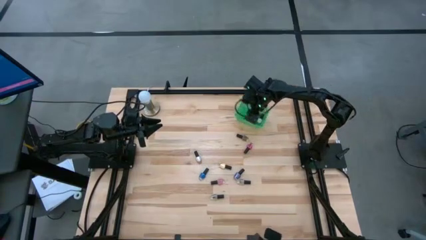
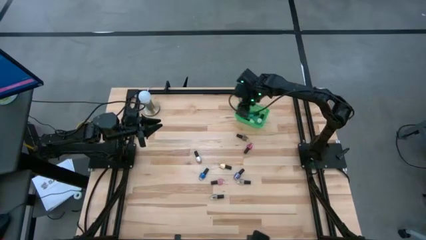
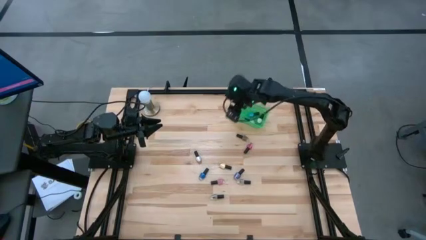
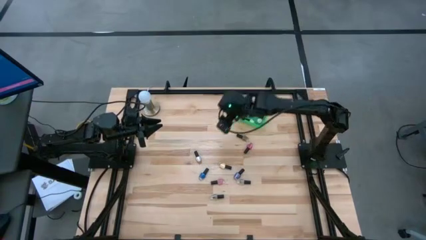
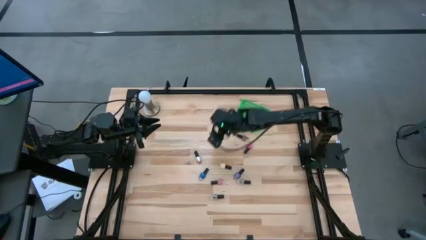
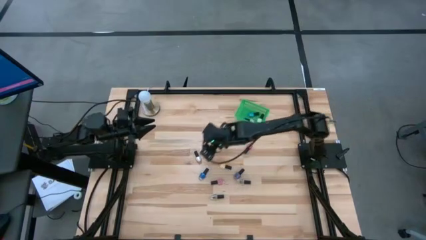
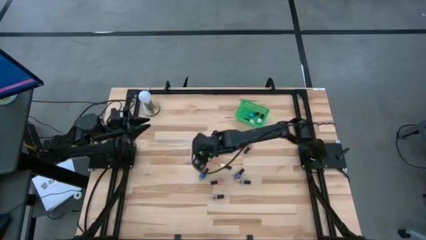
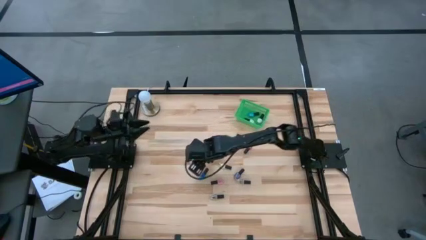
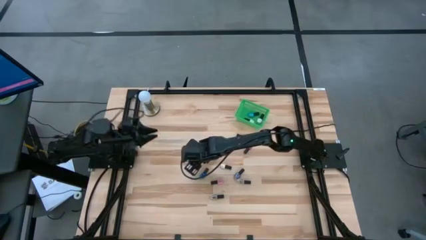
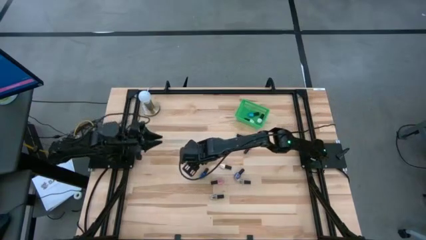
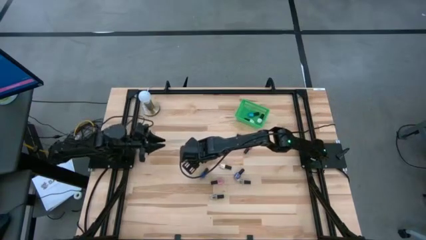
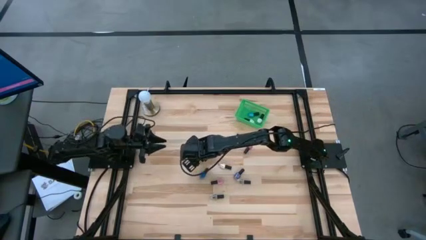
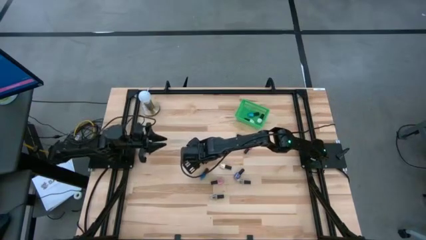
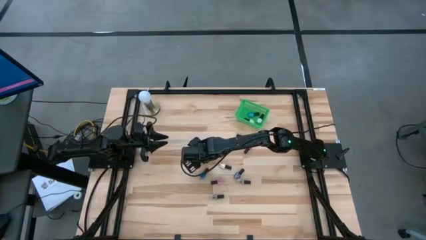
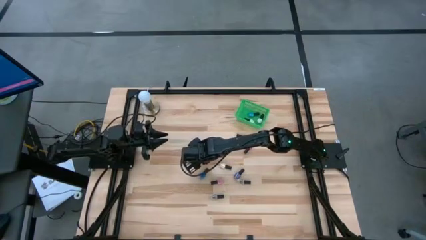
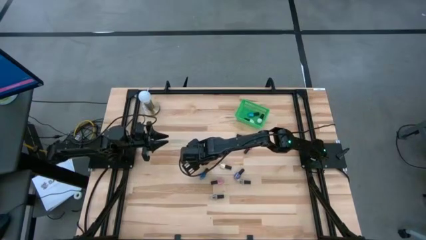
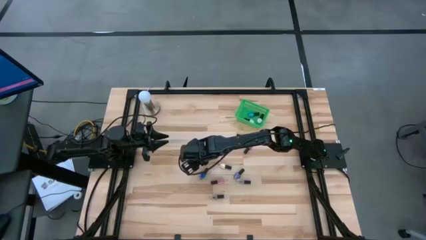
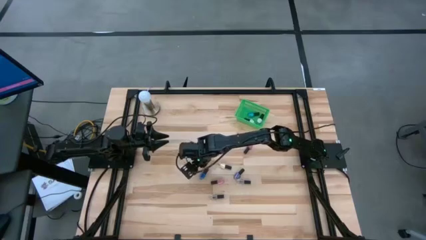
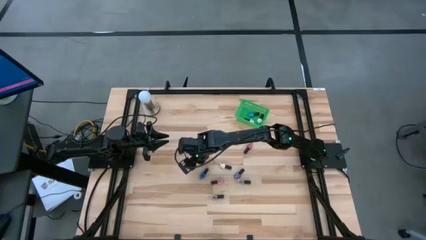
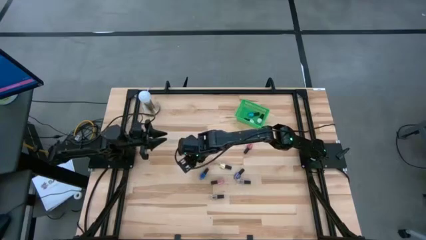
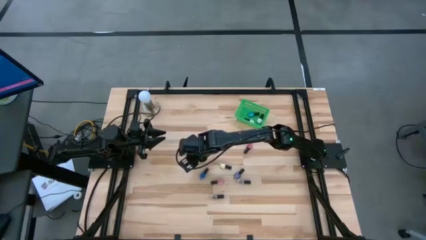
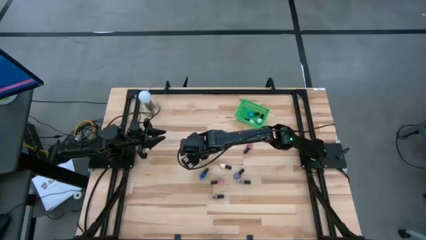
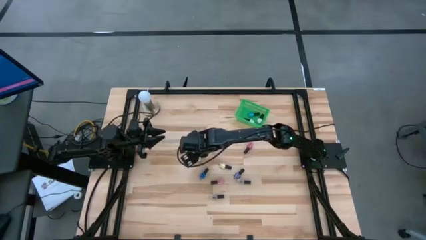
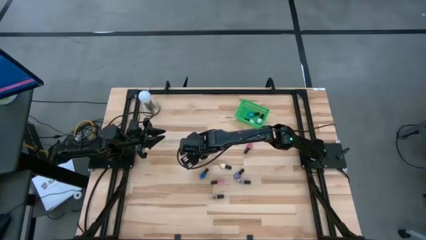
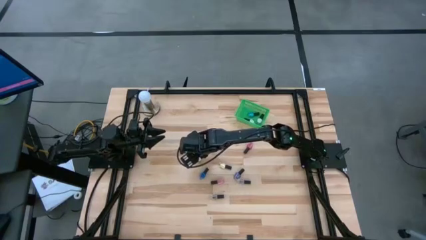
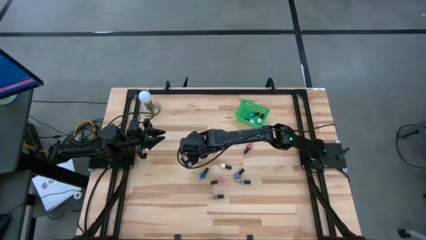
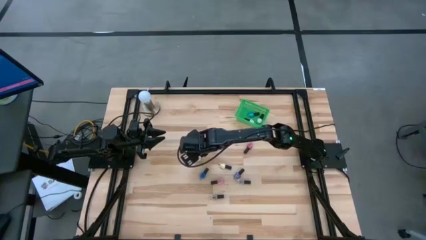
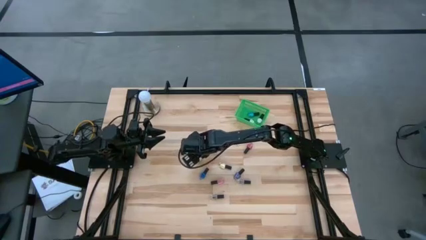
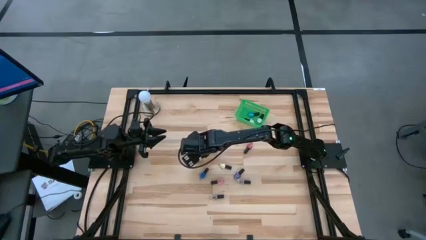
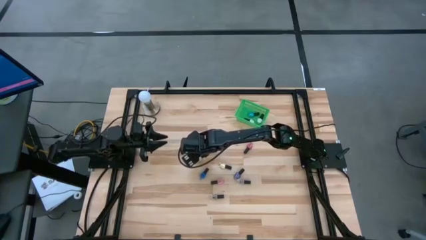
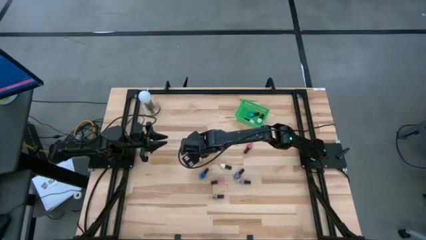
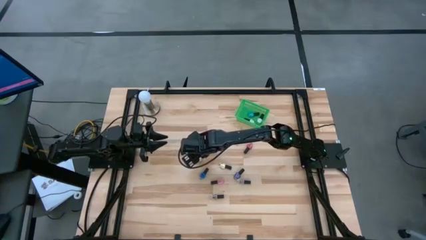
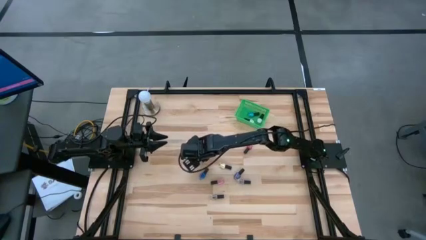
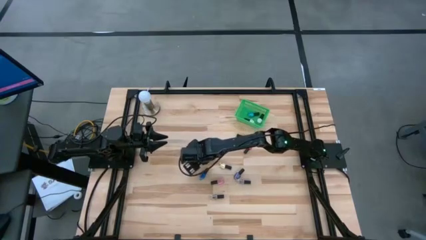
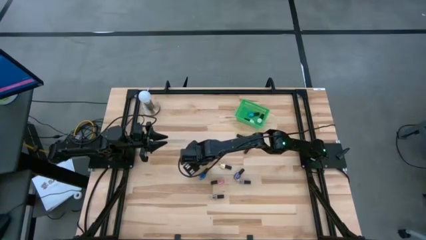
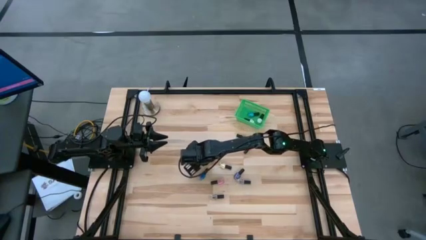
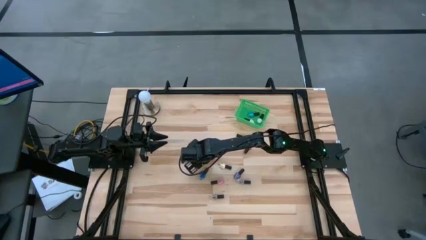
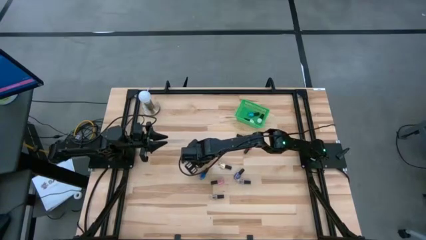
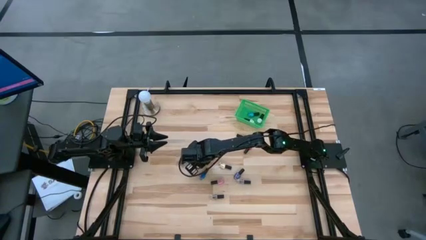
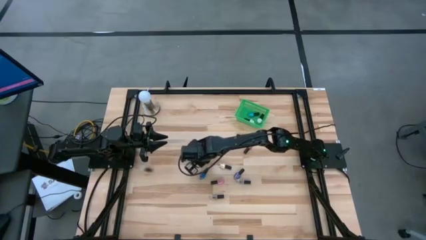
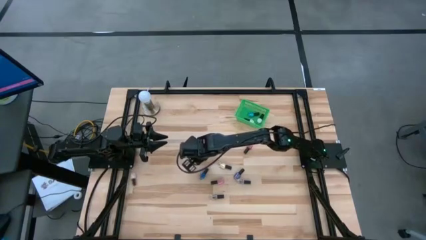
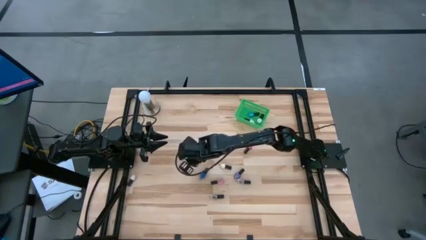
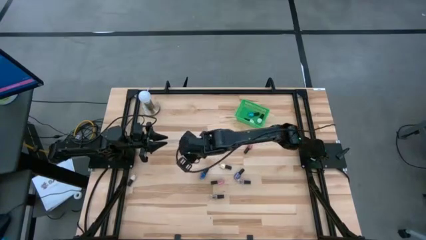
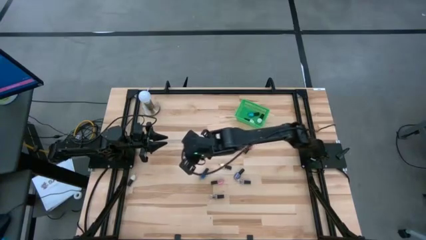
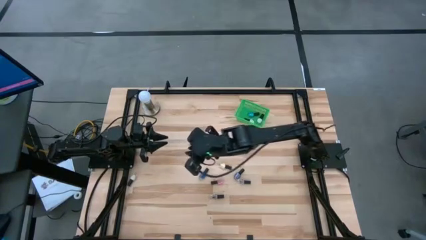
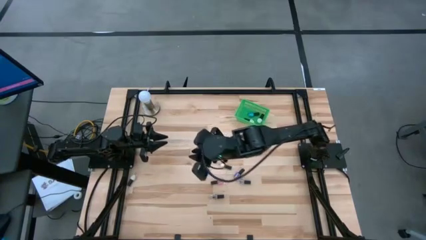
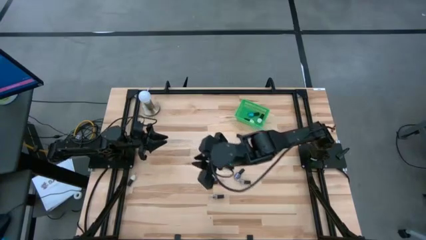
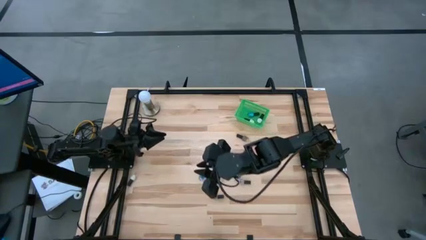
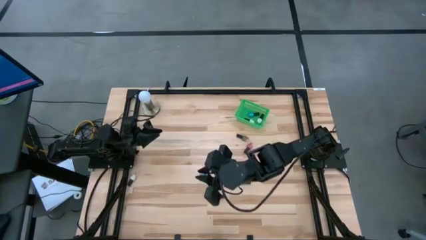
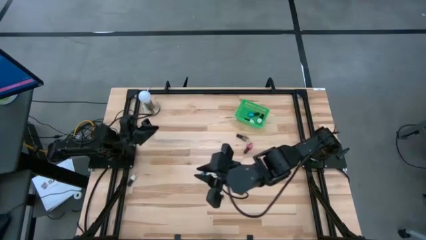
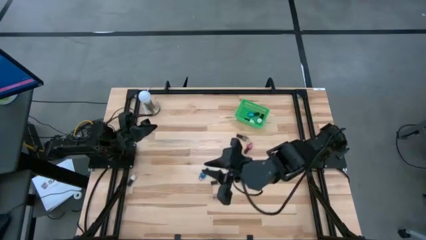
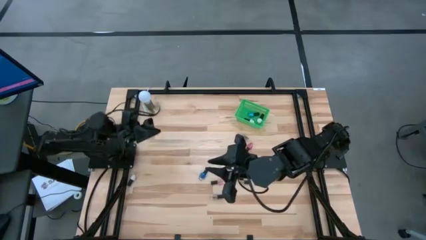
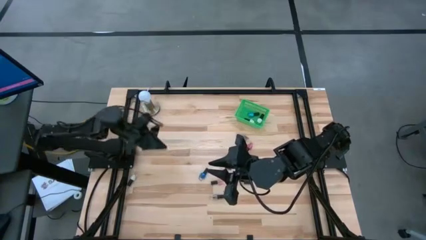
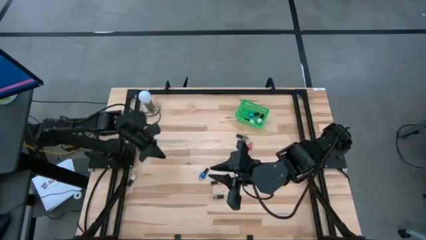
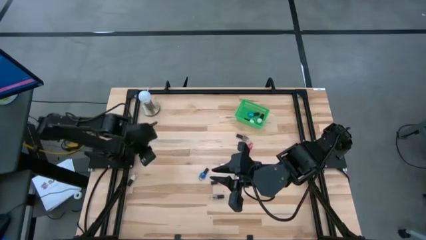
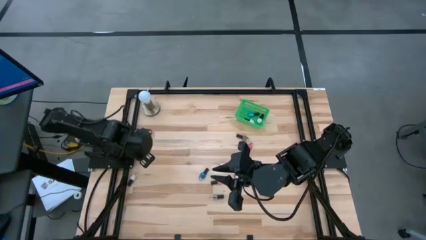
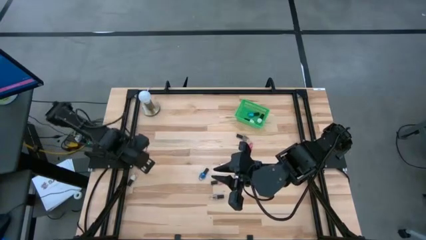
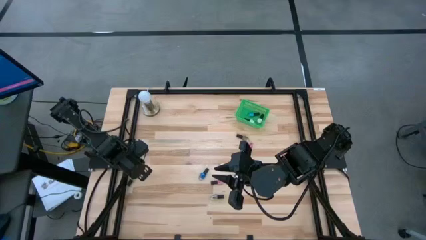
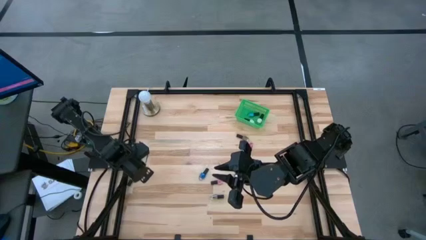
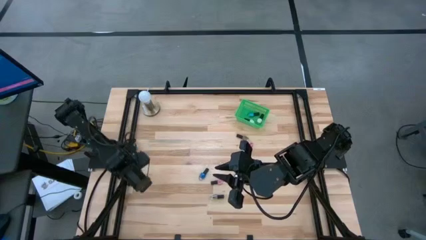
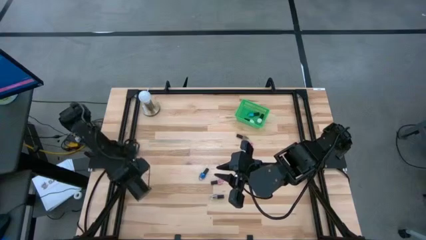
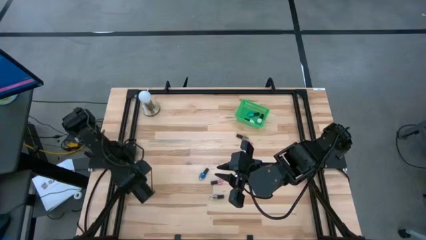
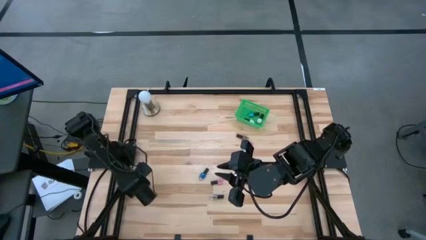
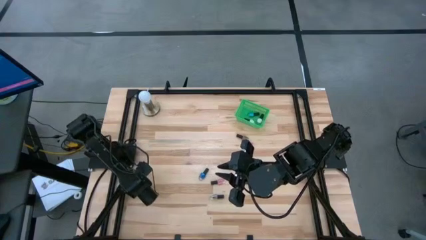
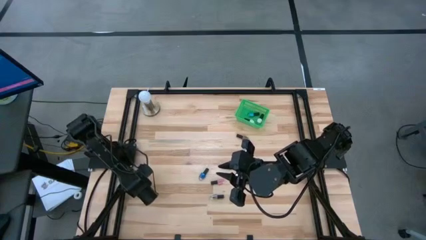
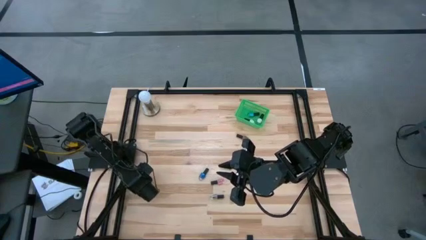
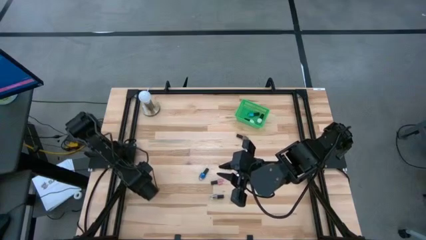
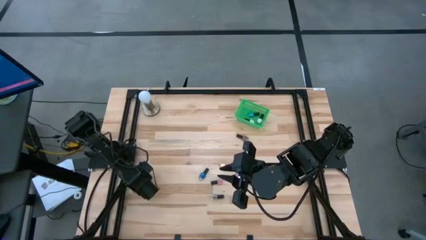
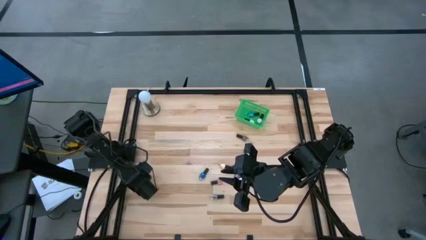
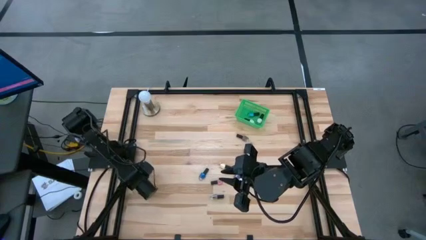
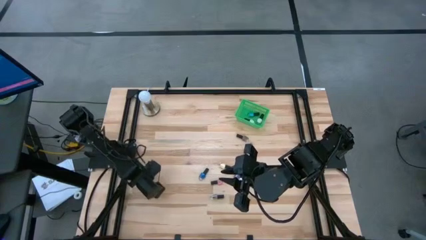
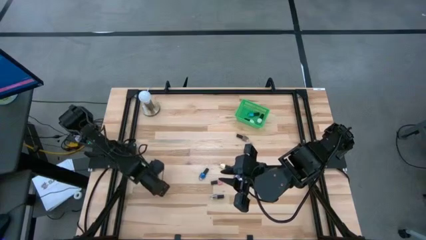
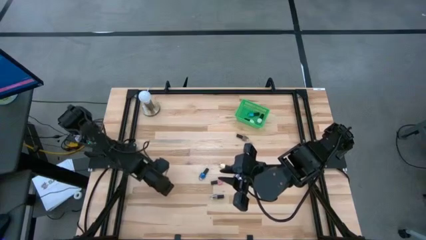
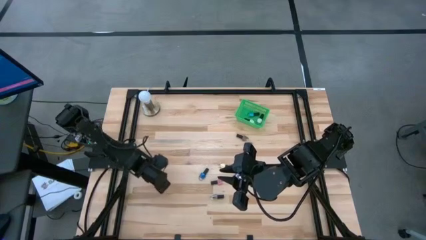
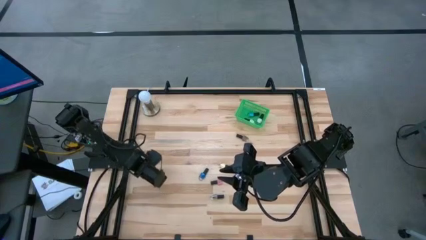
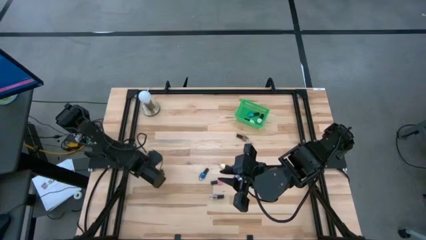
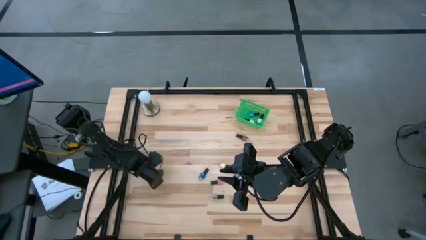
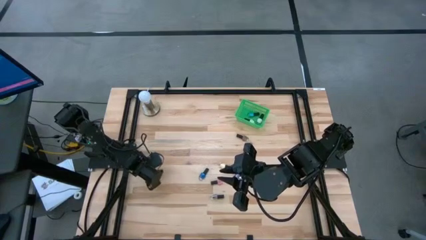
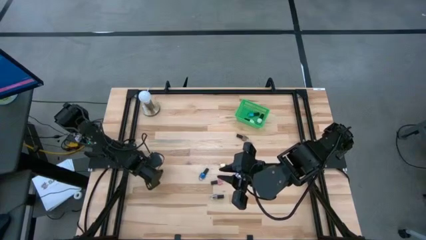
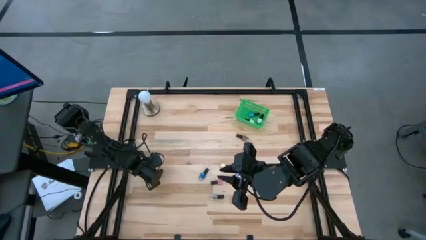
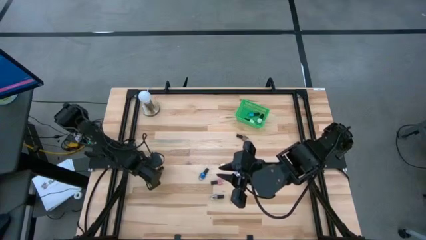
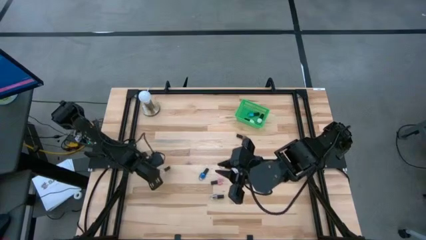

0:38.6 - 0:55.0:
Task: Pick & Place Nail Polish
Put the white nail polish into the green bin
